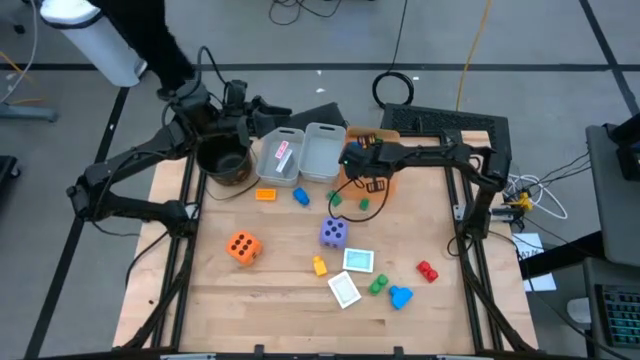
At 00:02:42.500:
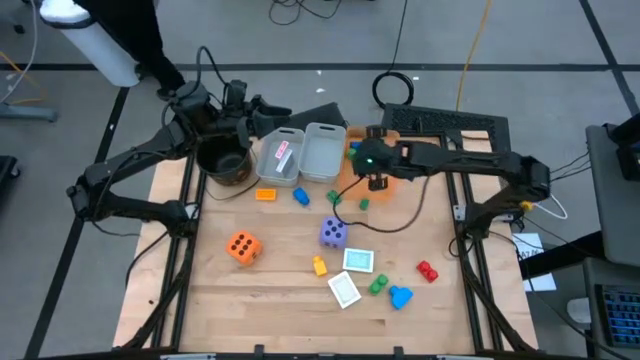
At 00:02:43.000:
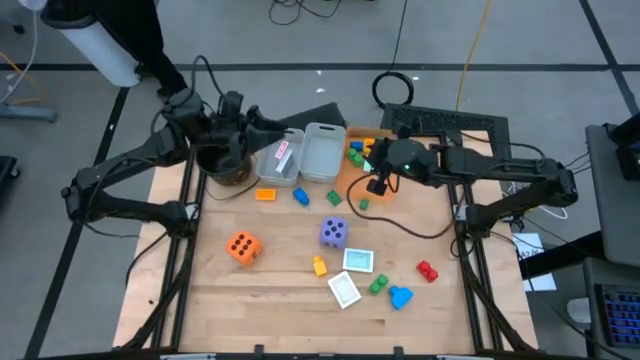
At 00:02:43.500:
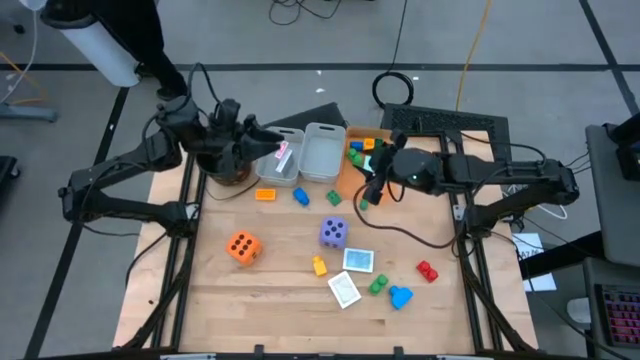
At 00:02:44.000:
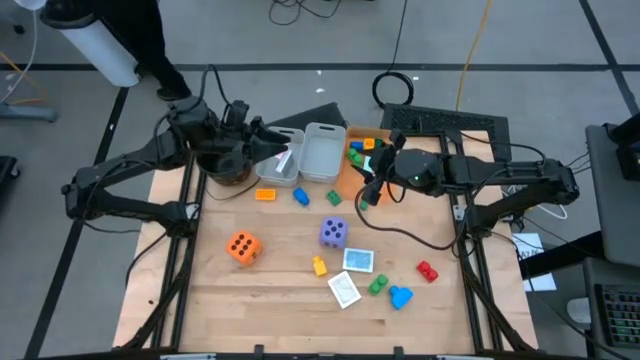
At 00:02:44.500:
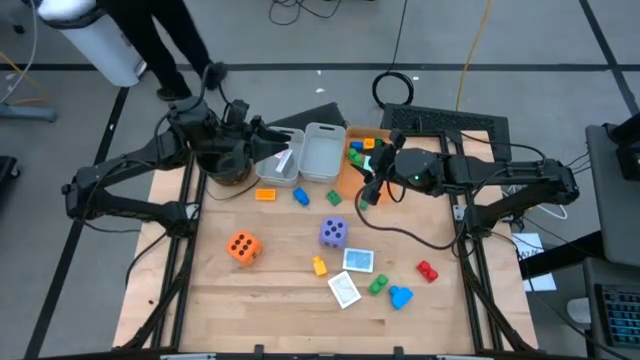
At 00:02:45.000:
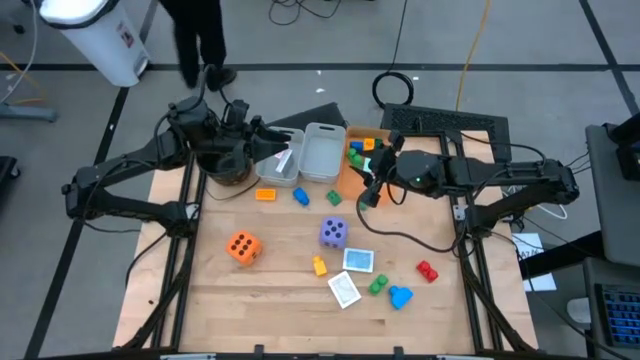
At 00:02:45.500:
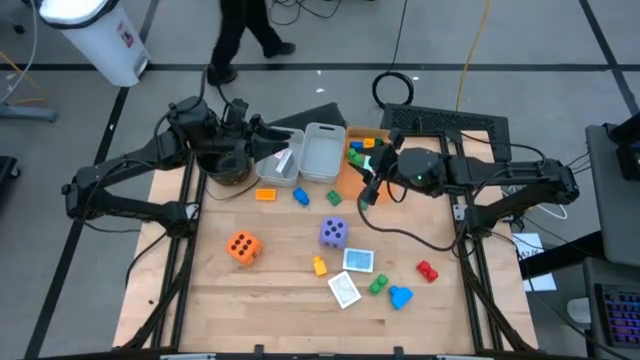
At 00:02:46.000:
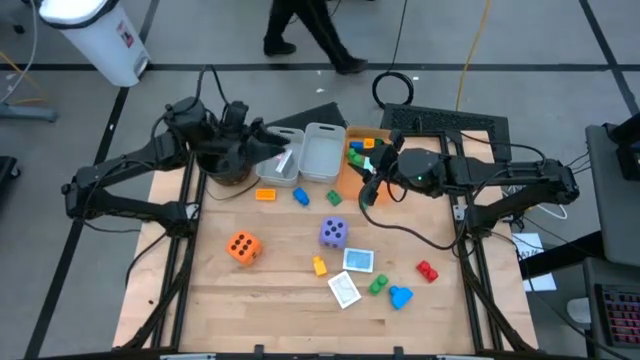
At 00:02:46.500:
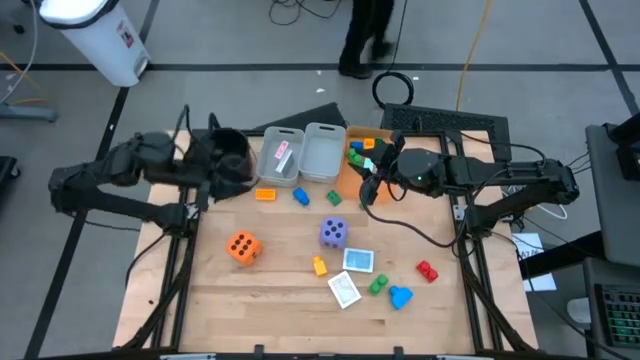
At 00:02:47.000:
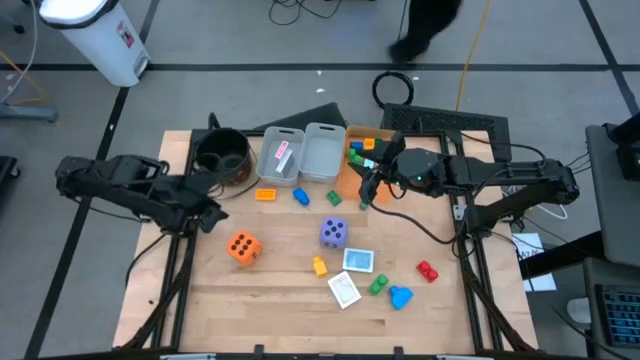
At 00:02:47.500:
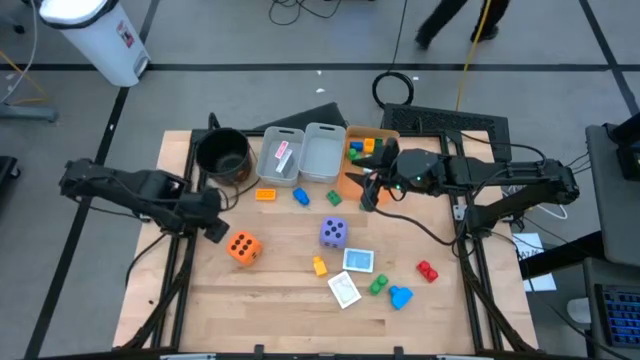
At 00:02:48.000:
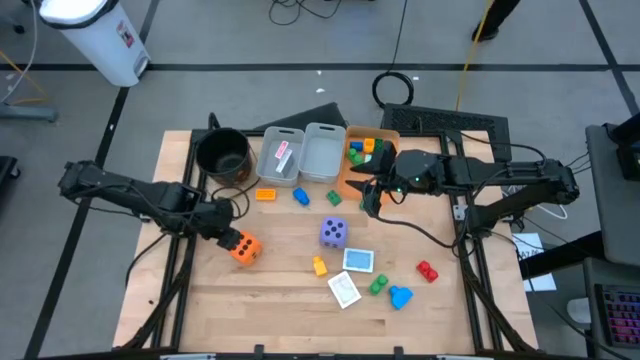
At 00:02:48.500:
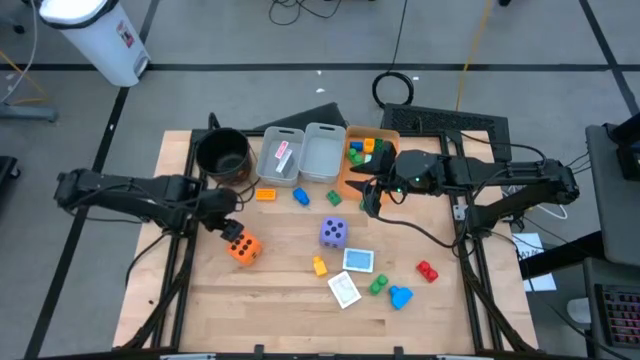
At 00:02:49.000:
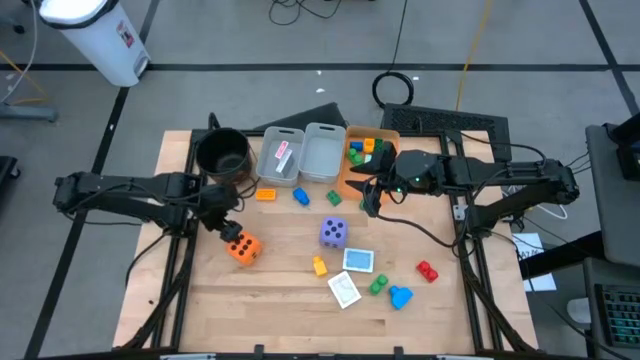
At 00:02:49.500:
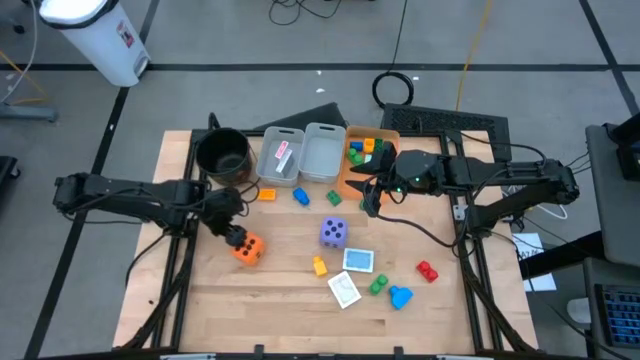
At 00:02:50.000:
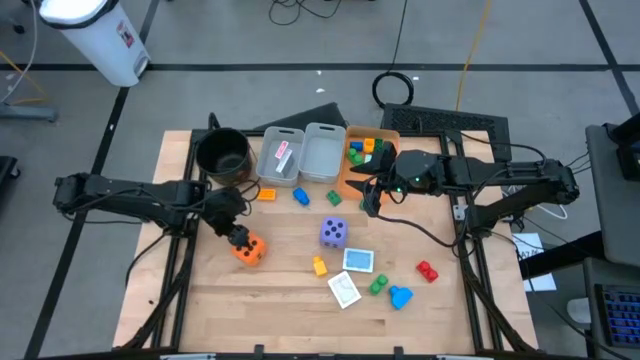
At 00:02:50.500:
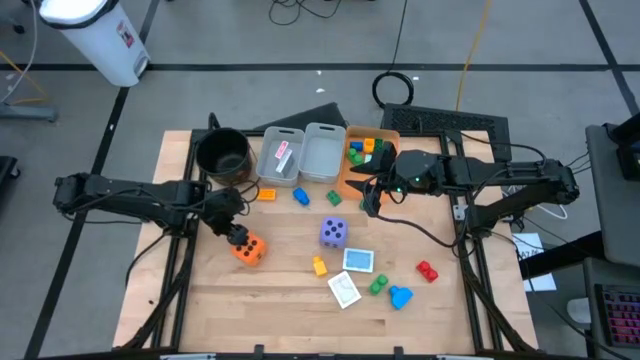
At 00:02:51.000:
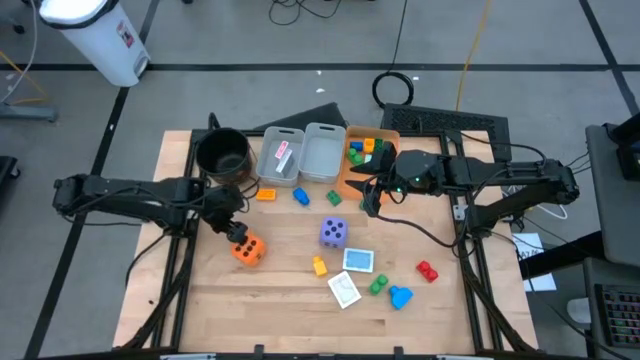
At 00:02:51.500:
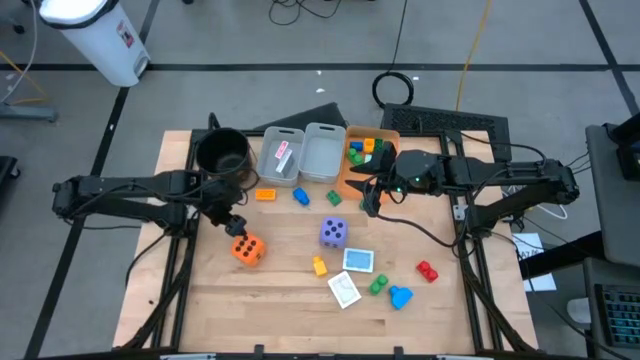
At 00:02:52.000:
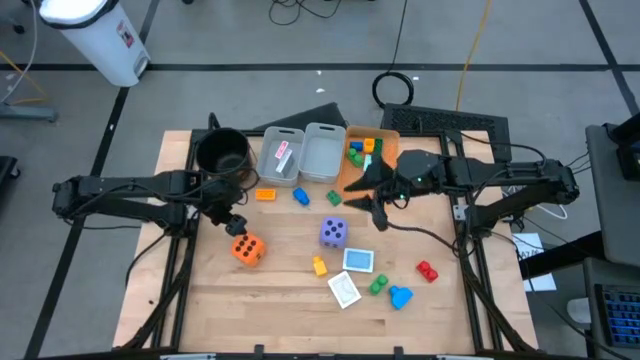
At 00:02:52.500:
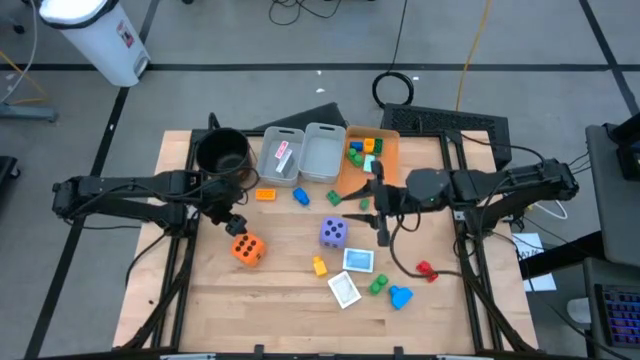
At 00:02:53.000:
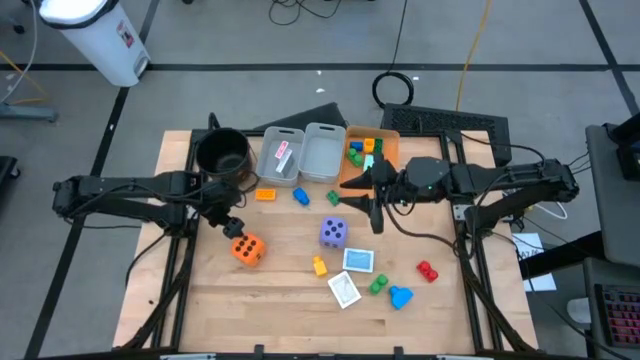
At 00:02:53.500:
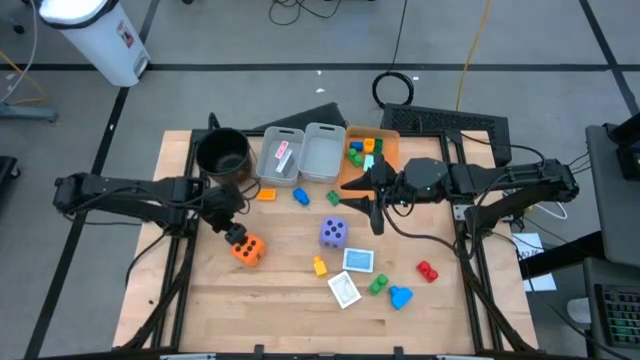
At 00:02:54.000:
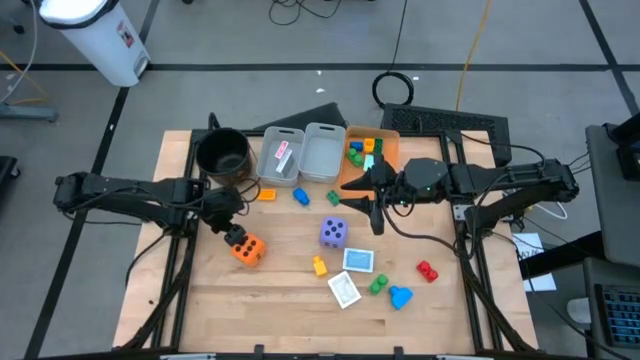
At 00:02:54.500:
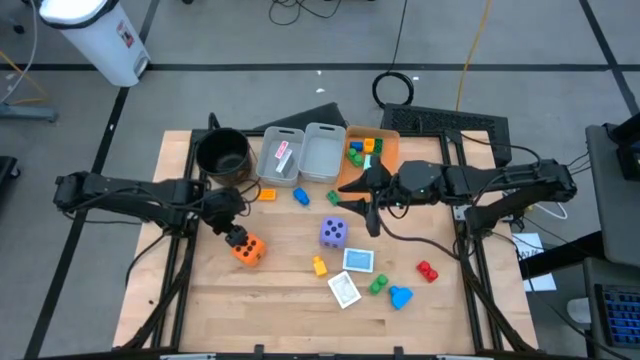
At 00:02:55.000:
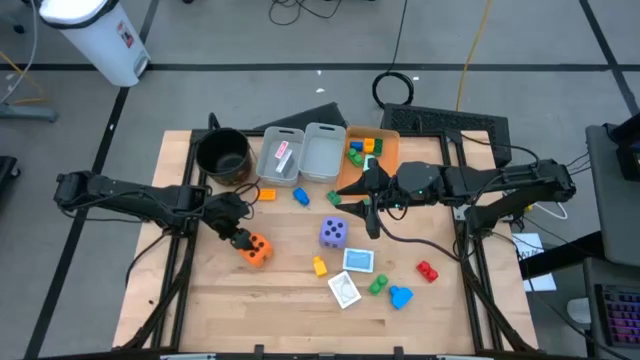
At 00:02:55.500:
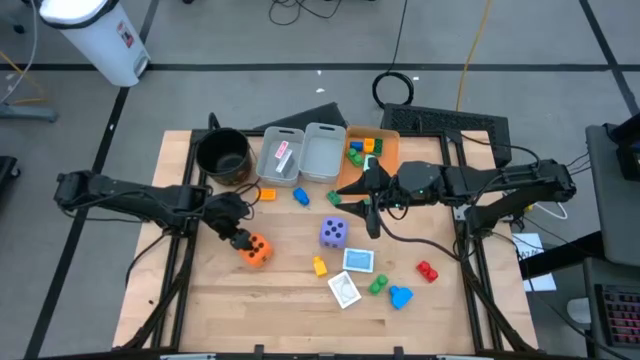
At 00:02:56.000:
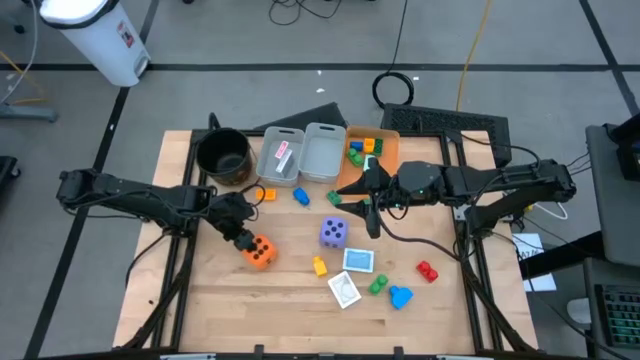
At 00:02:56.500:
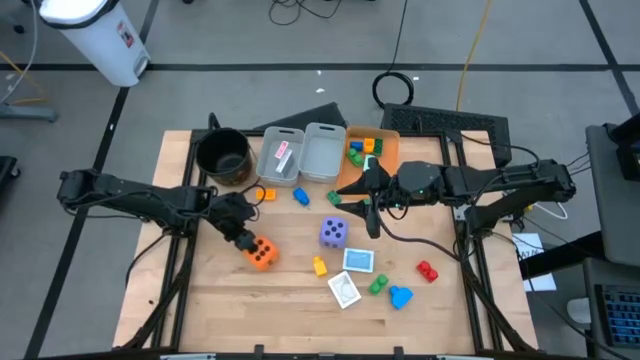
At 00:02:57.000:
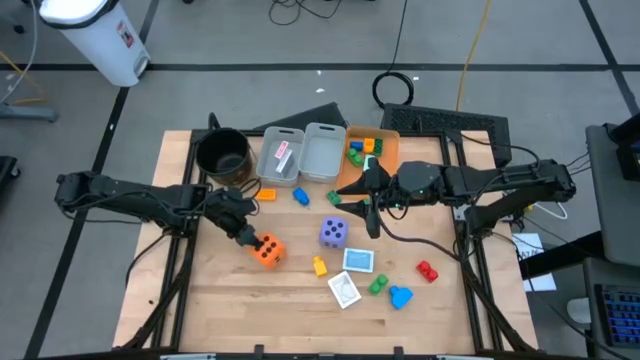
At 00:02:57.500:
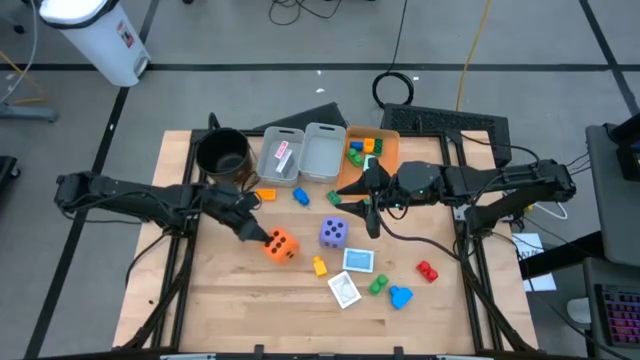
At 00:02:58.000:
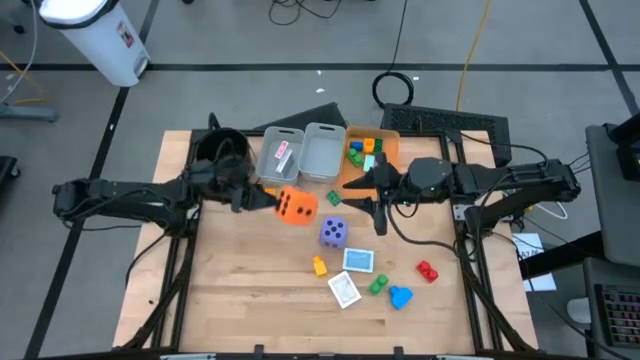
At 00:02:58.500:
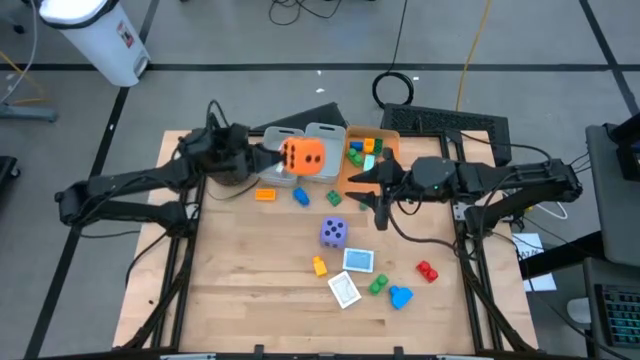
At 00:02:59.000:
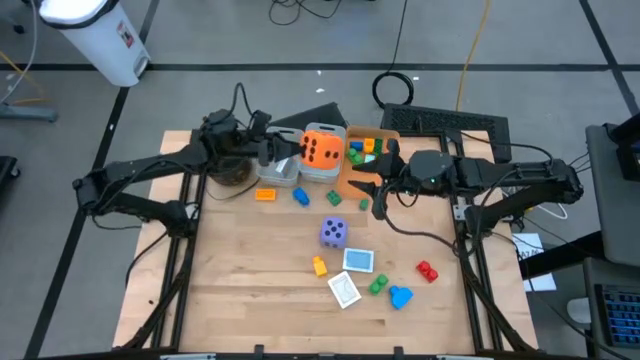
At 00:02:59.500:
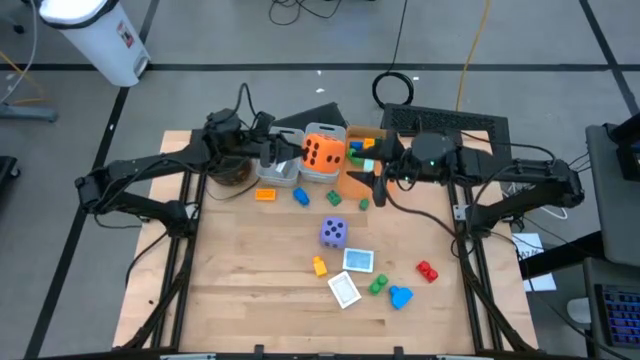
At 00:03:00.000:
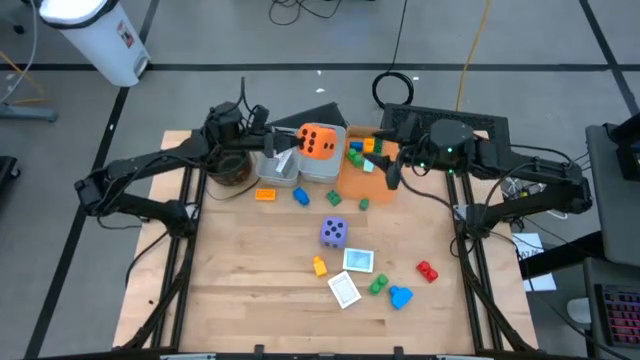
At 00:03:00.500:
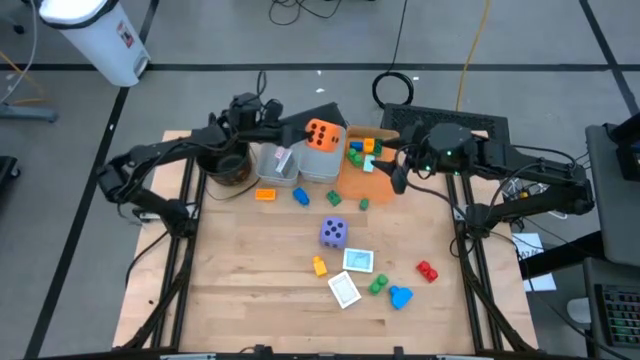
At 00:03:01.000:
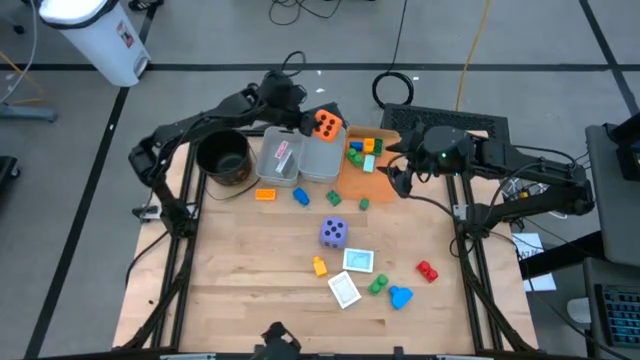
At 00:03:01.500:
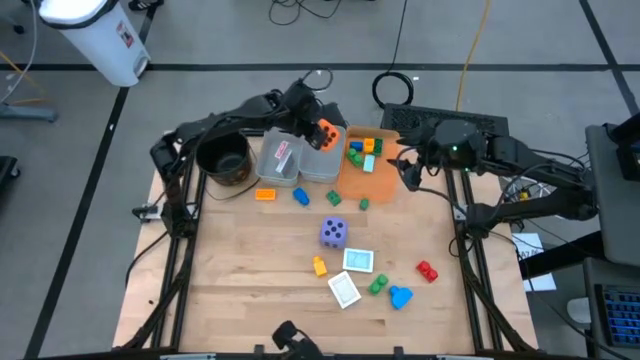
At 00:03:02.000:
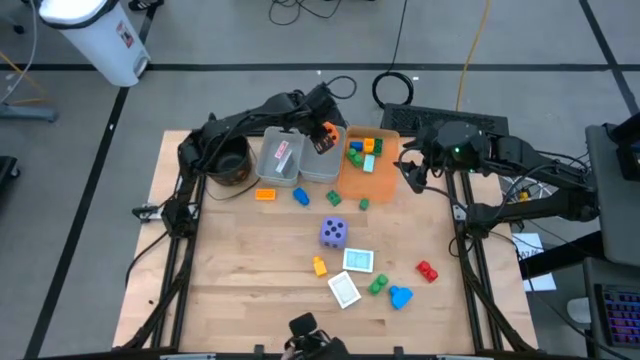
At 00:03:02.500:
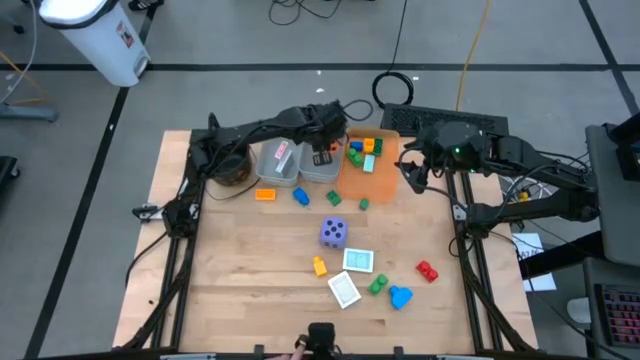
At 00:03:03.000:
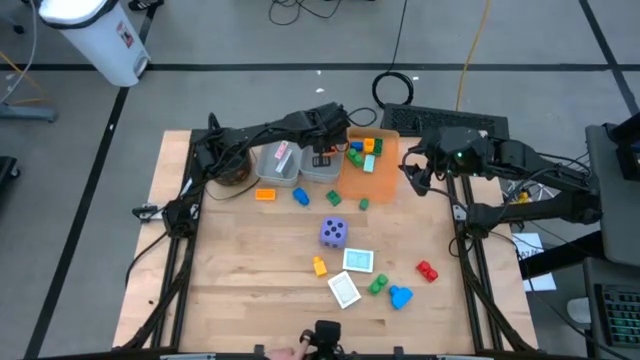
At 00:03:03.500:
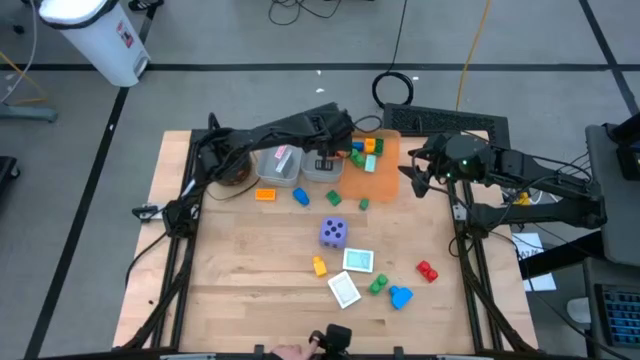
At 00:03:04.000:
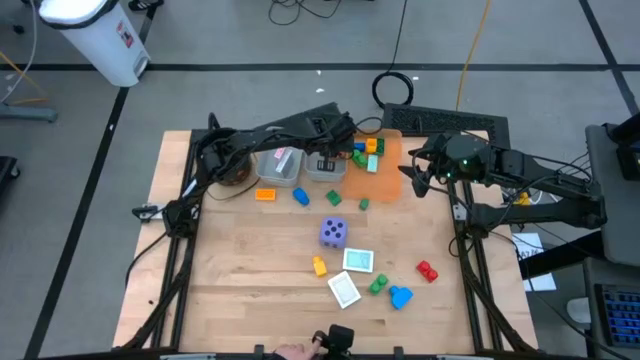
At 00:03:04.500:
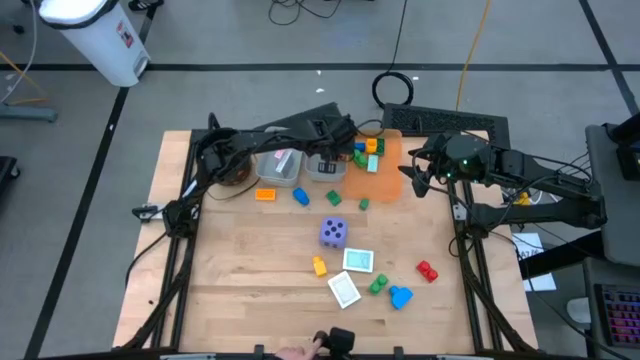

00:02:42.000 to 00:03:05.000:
Task: Pick & Place Toys
Put the orange dice into the right gray bin
